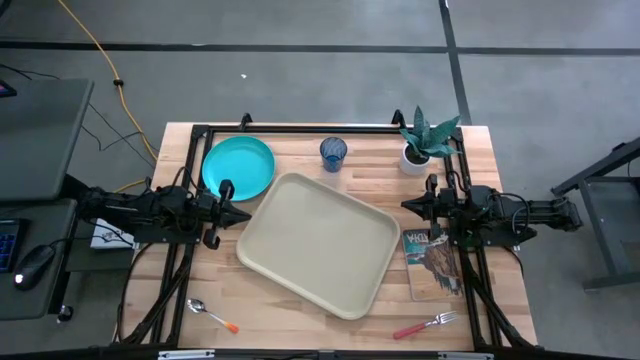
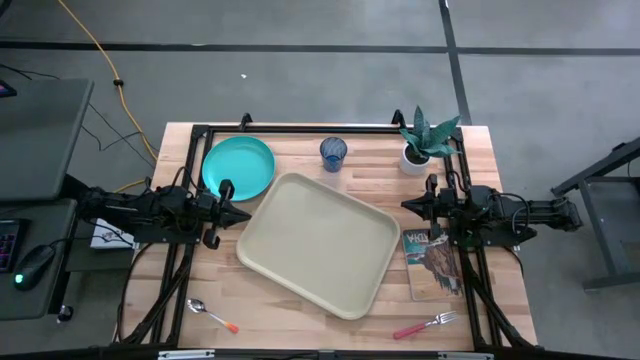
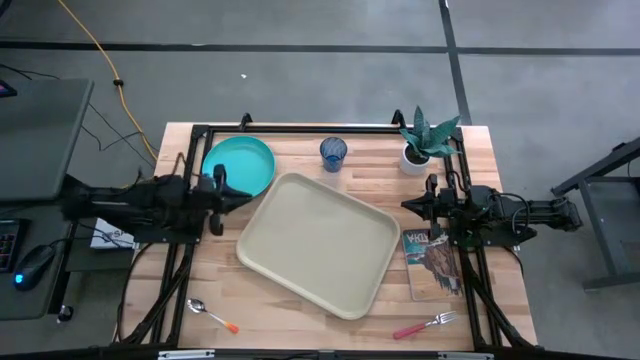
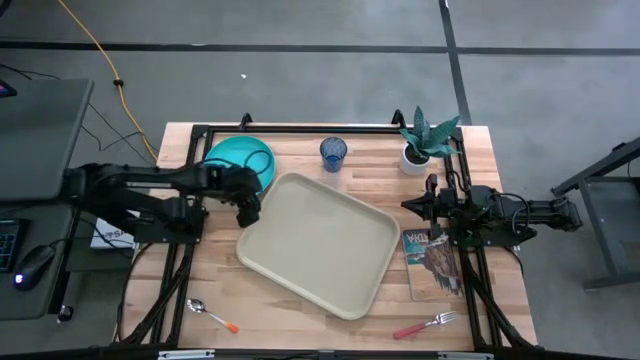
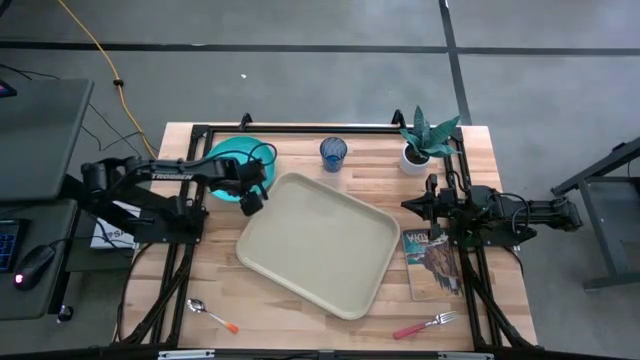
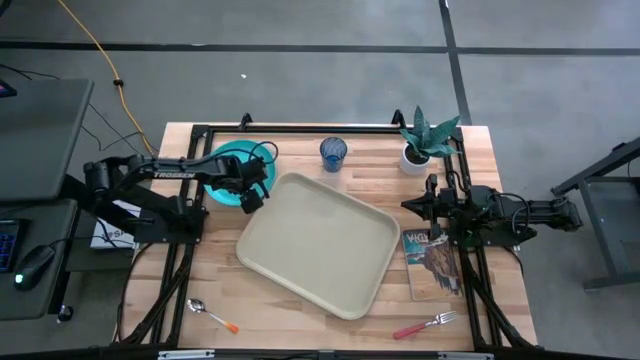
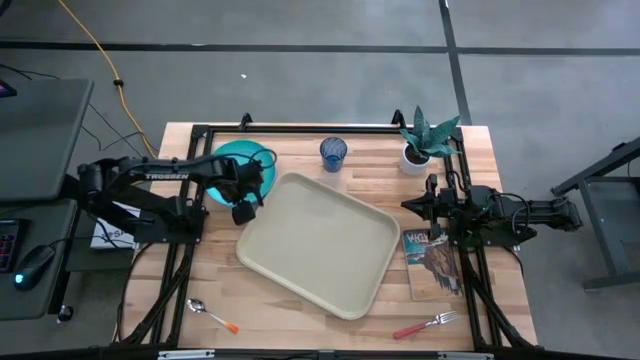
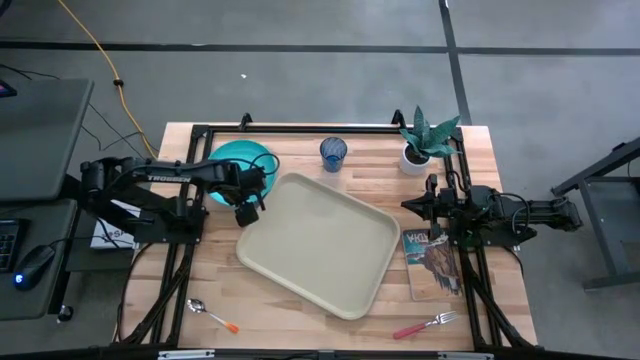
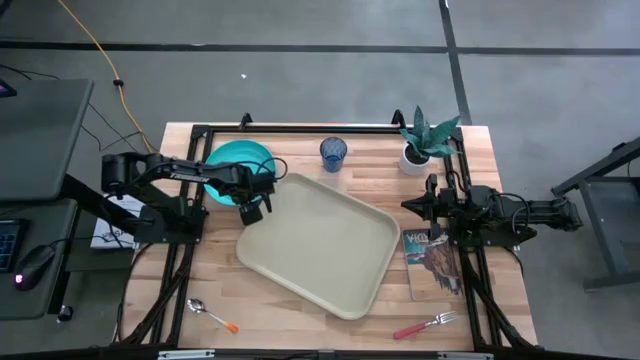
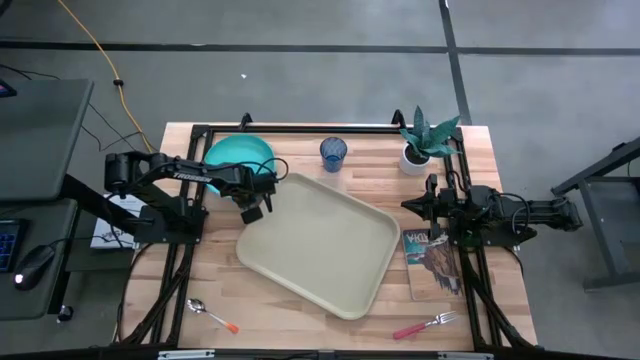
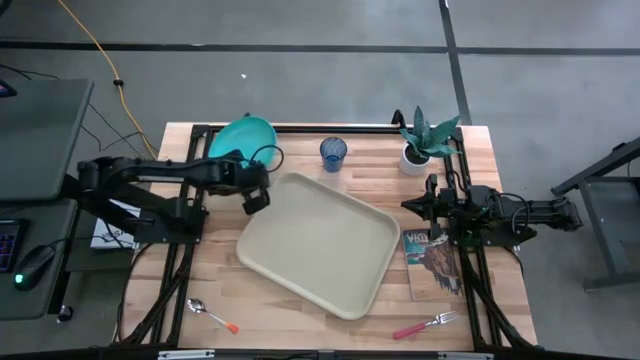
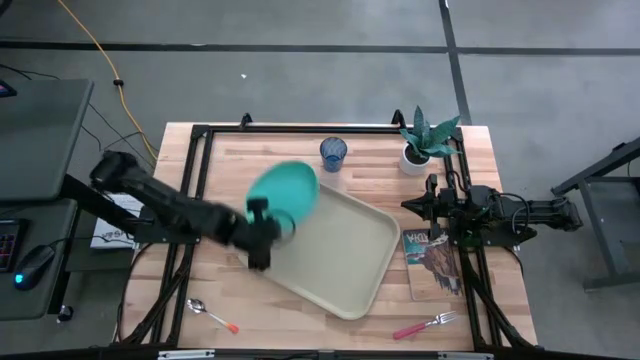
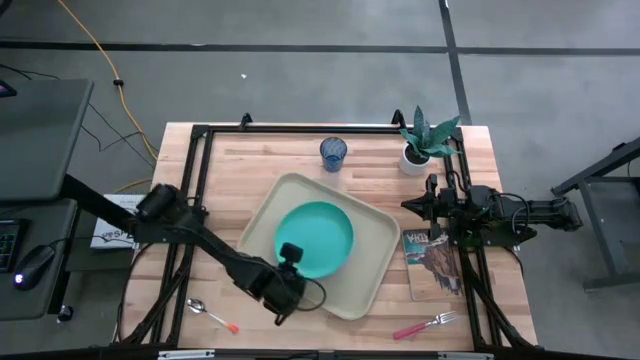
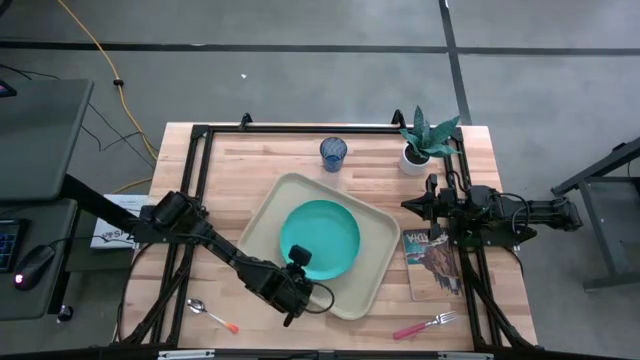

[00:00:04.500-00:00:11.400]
Task: Pick and place plate/cup/fork/spoon on tray
Put the blue plate on the gray serving tray

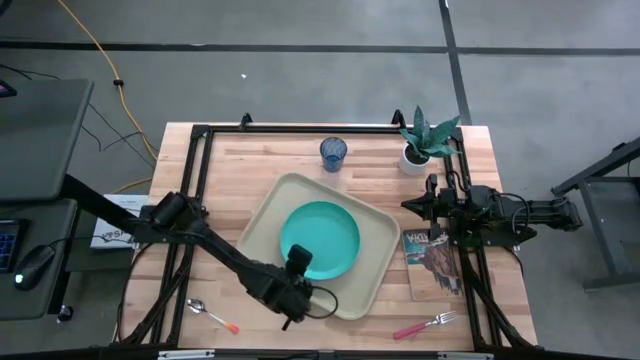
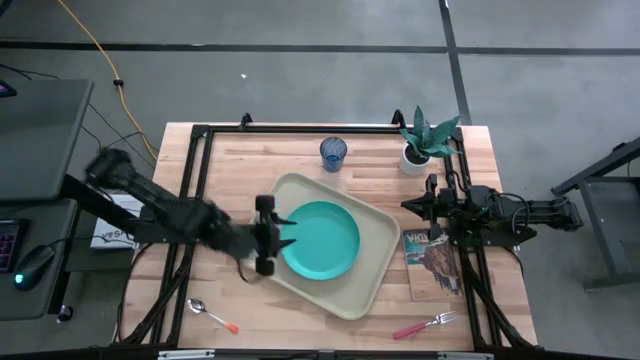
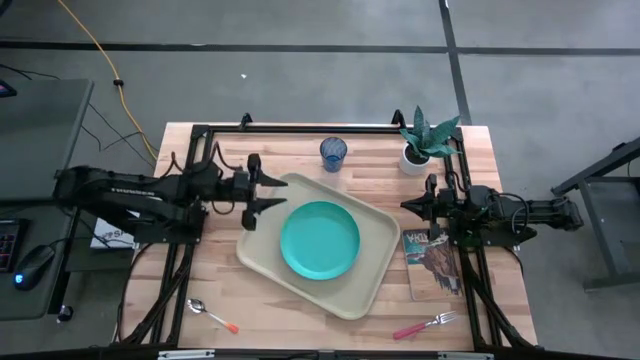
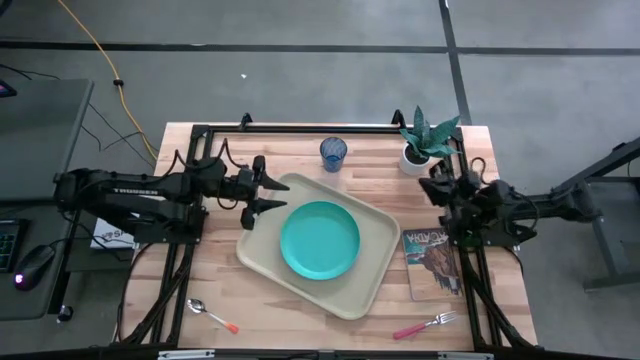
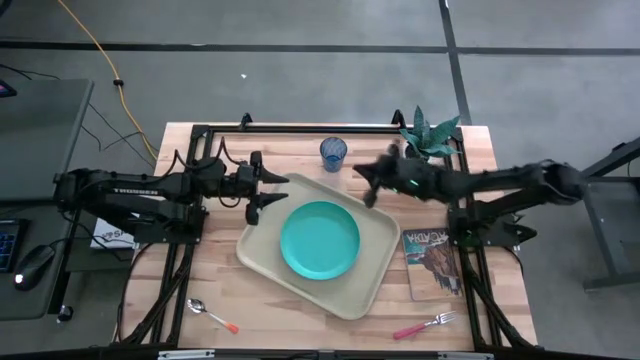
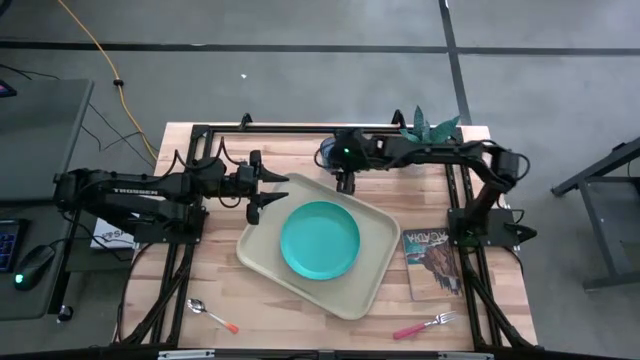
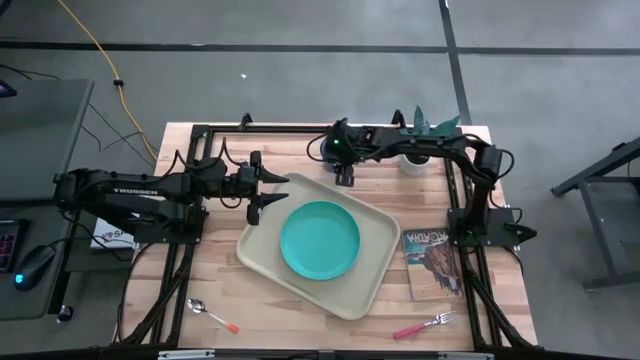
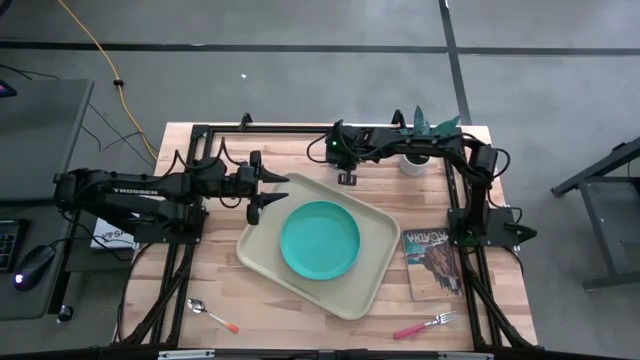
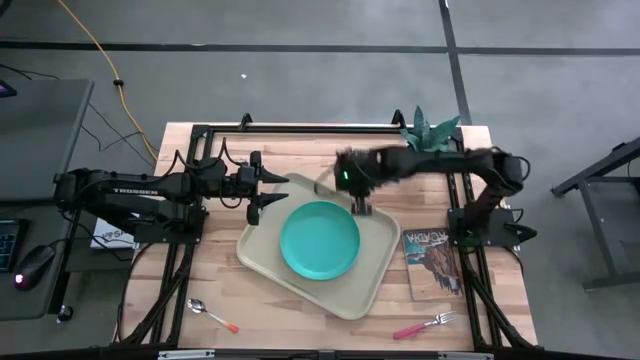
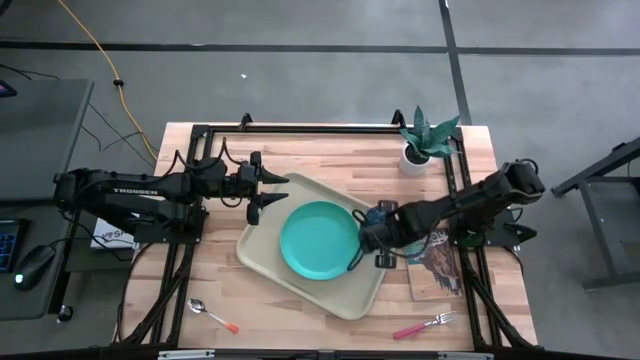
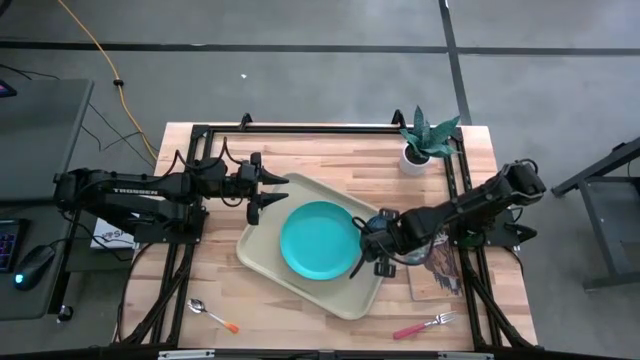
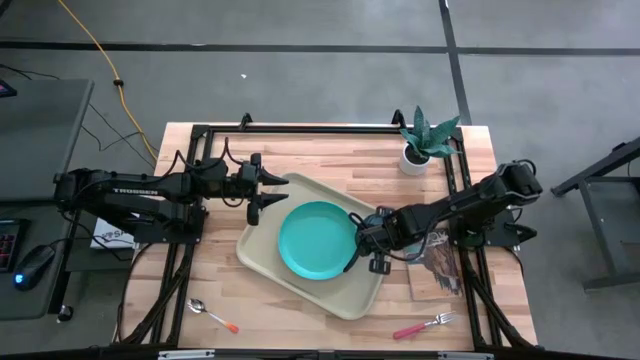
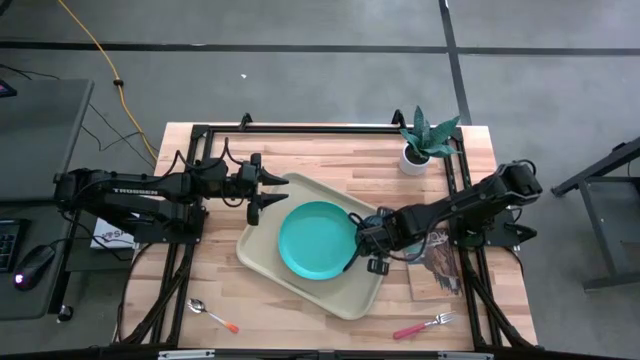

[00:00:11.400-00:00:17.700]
Put the blue cup on the gray serving tray to the top right of blue plate

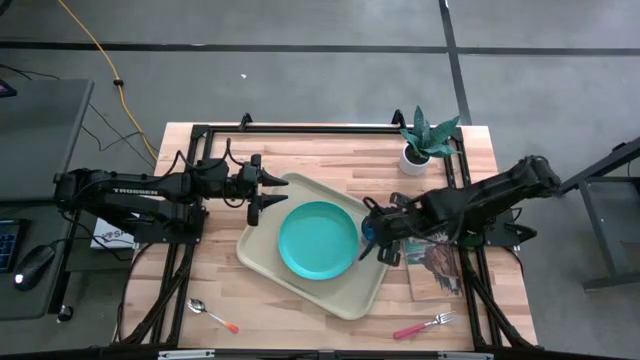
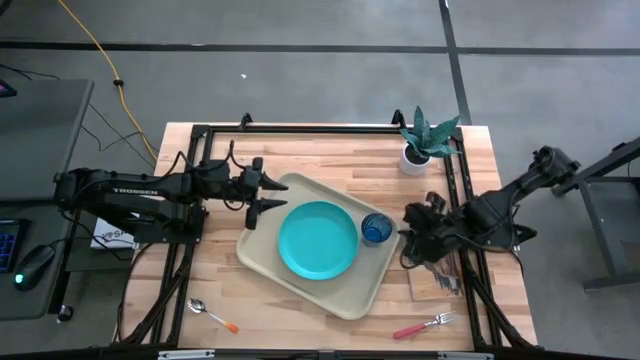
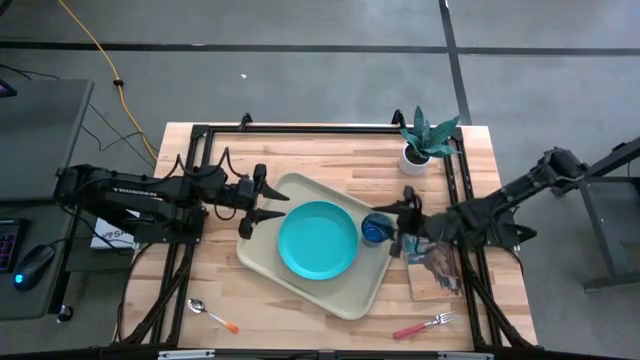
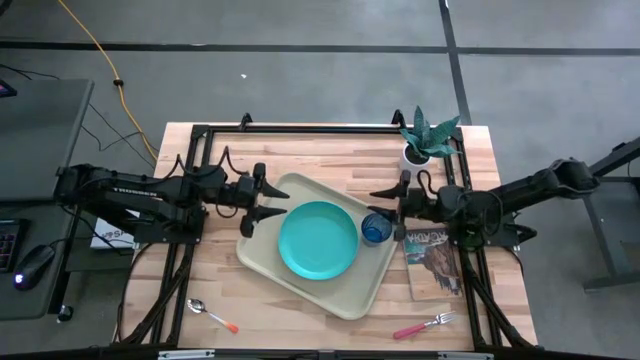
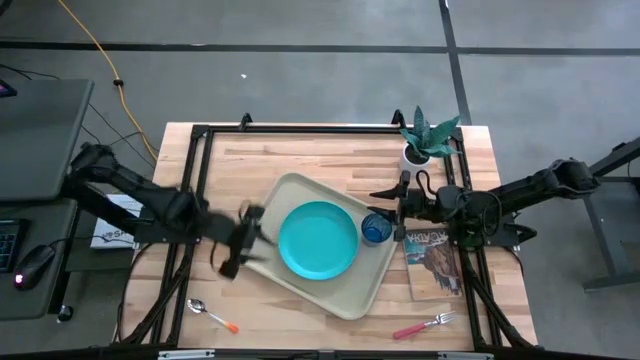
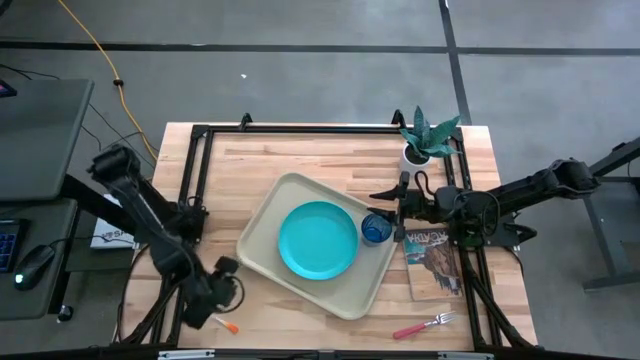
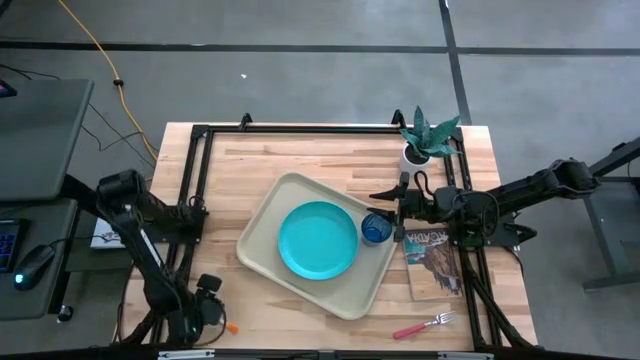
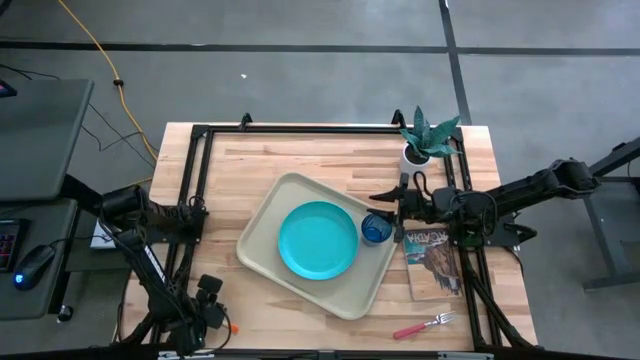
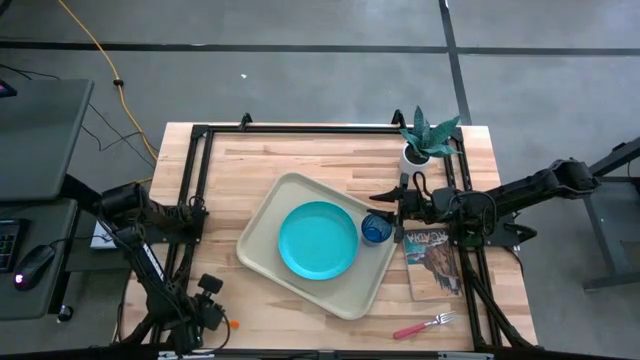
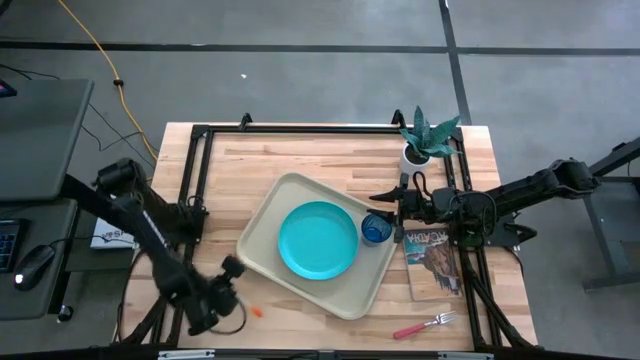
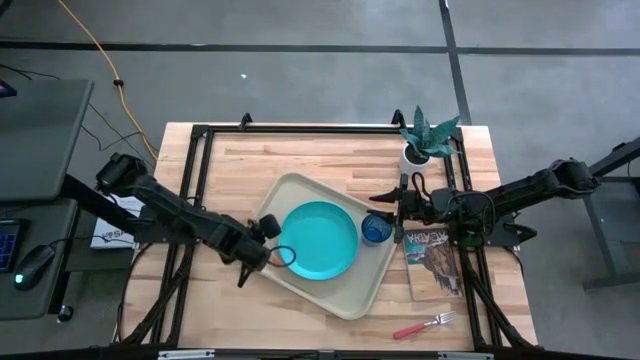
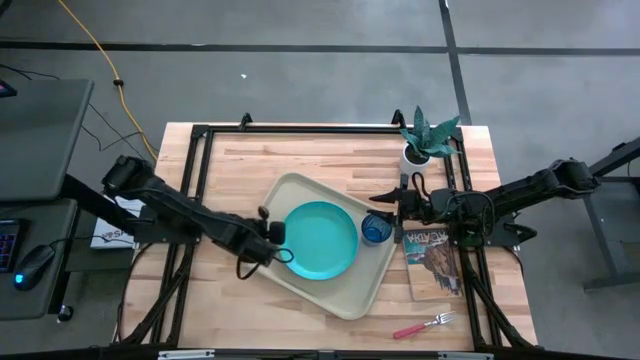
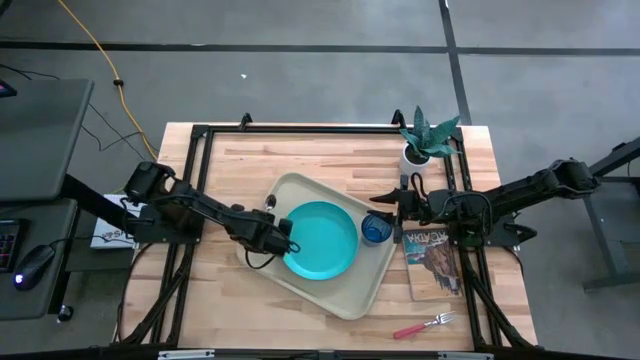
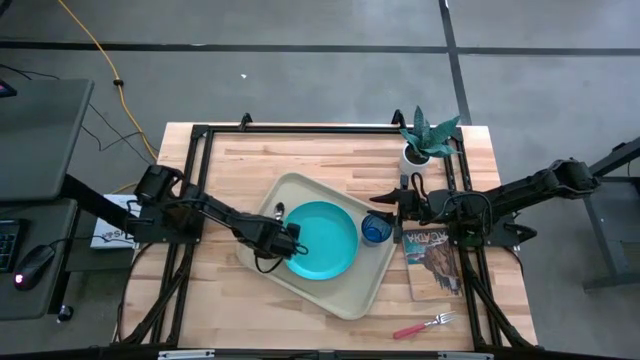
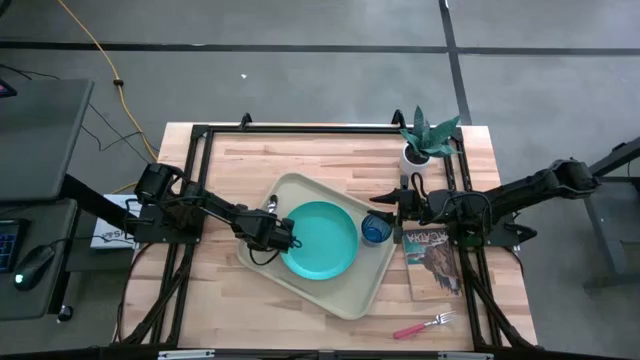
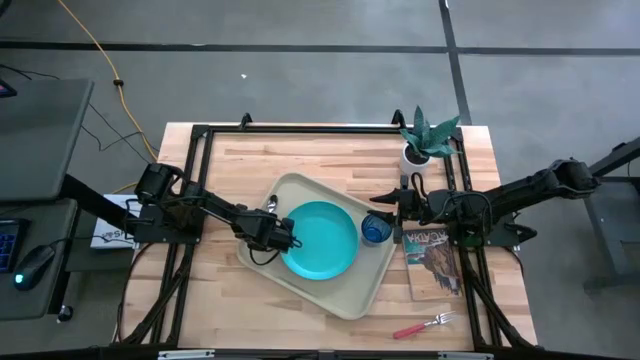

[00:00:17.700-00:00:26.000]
Put the orange spoon on the gray serving tray to the left of the blue plate
